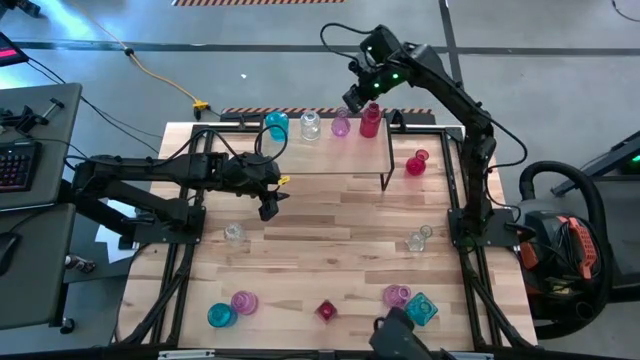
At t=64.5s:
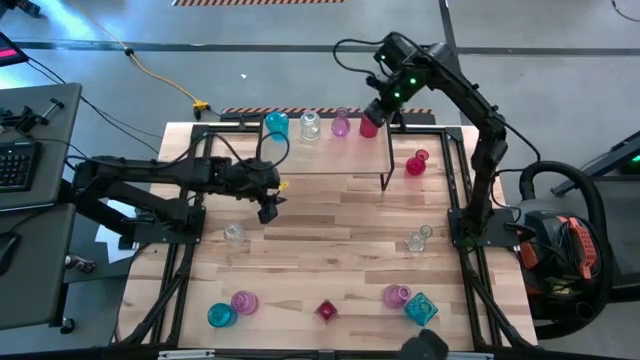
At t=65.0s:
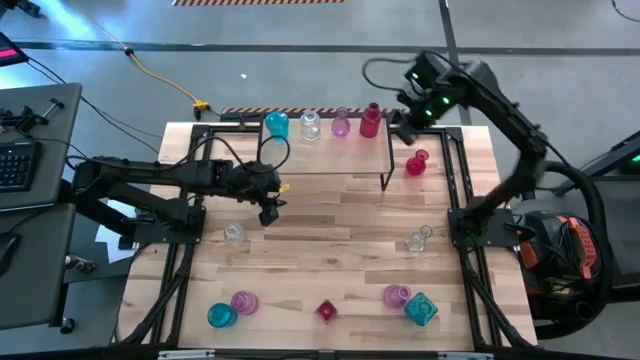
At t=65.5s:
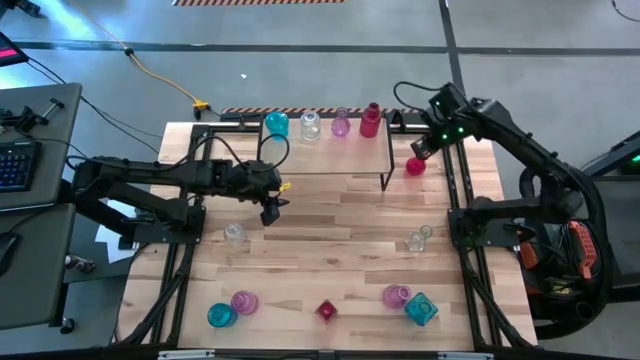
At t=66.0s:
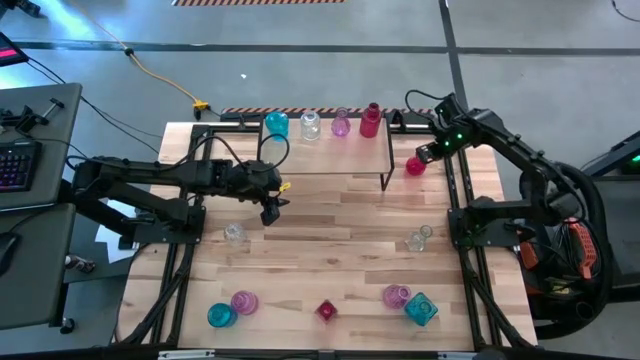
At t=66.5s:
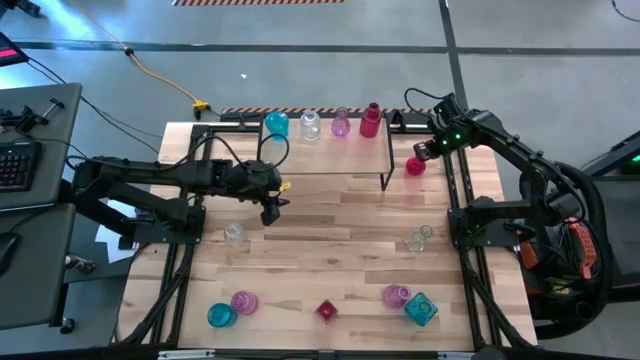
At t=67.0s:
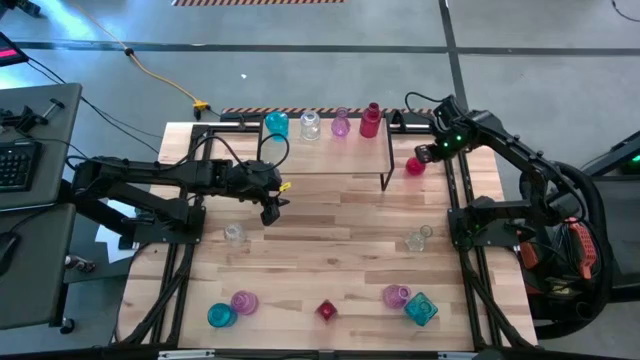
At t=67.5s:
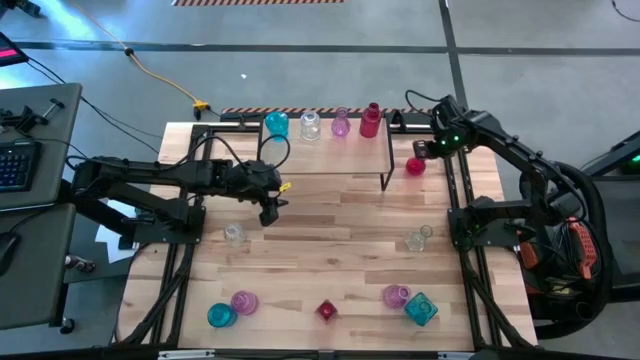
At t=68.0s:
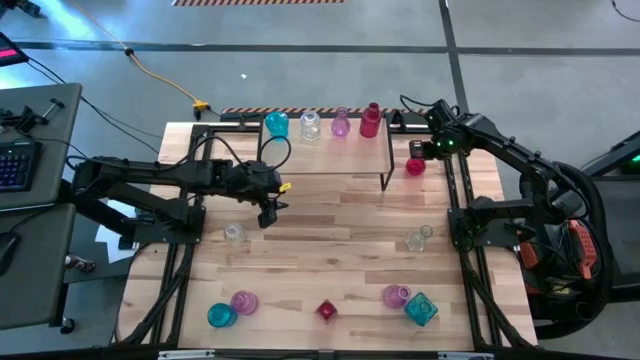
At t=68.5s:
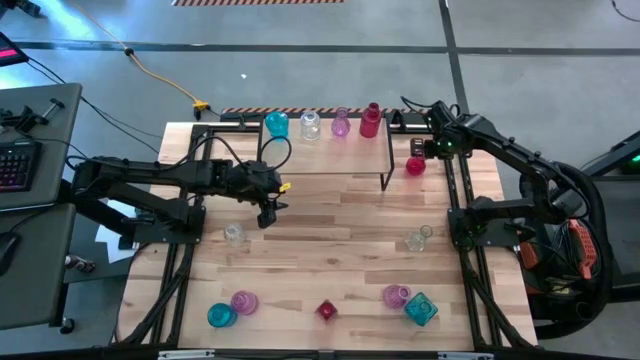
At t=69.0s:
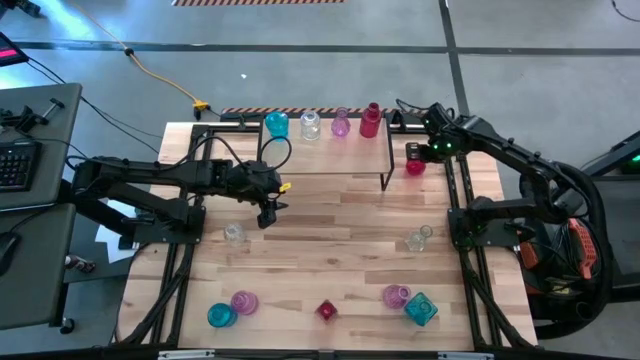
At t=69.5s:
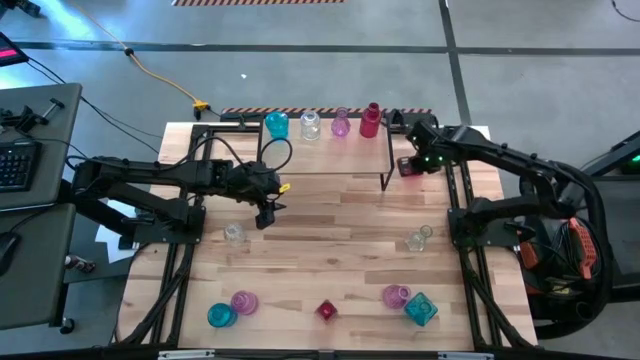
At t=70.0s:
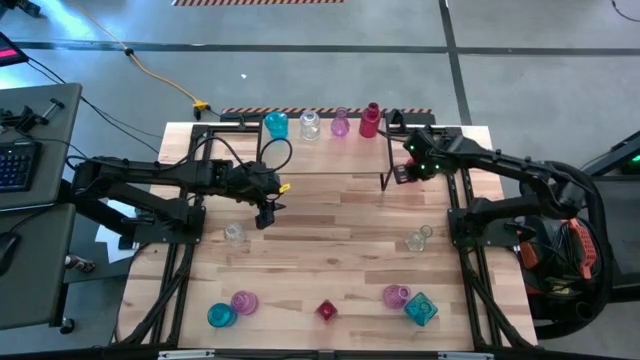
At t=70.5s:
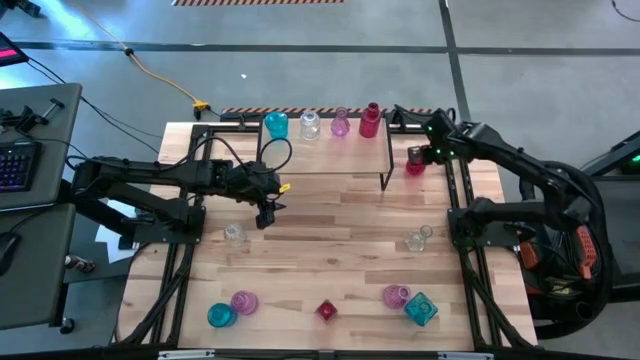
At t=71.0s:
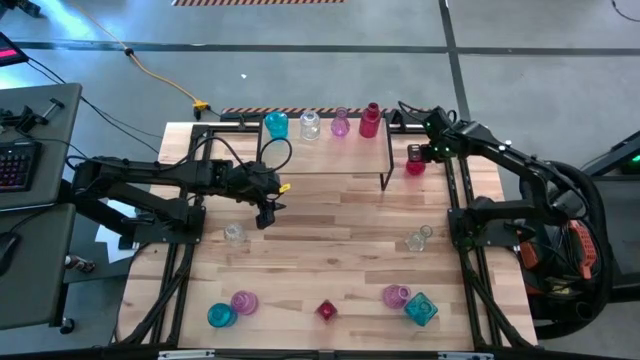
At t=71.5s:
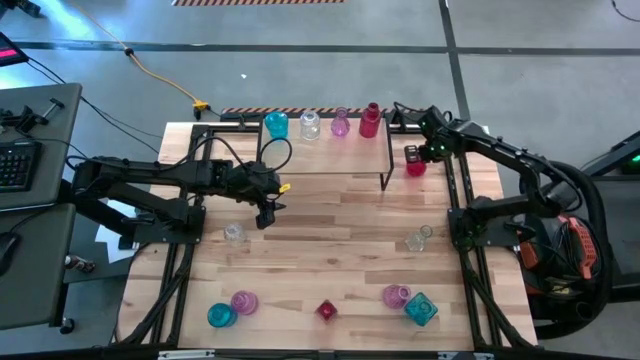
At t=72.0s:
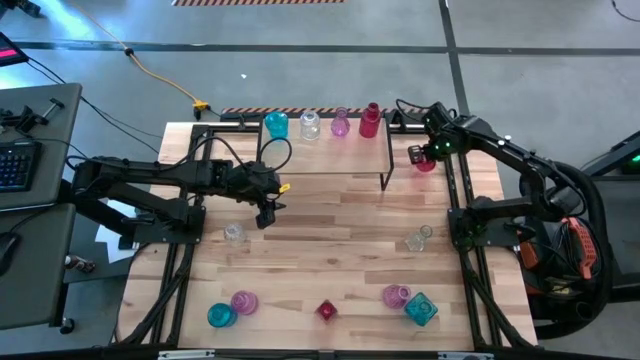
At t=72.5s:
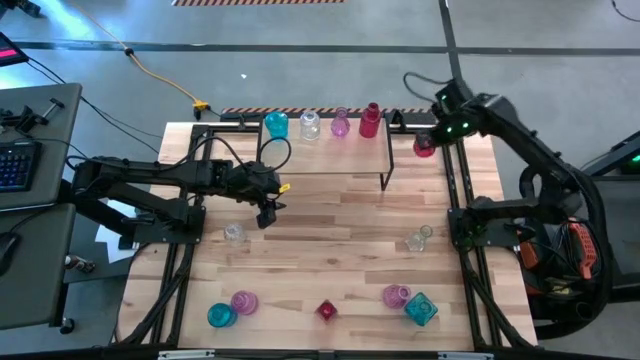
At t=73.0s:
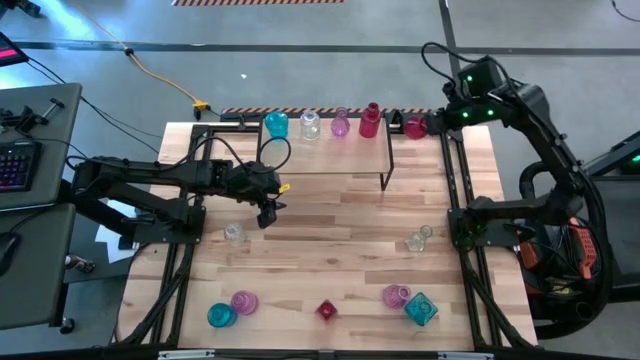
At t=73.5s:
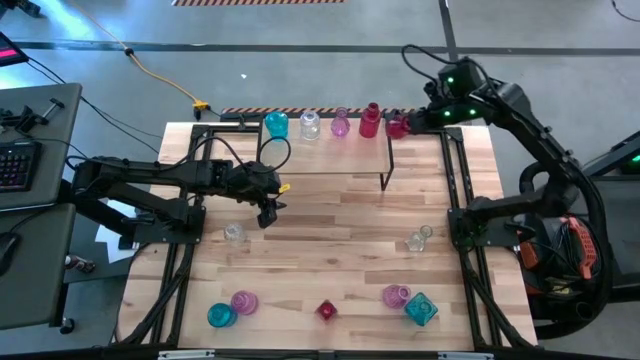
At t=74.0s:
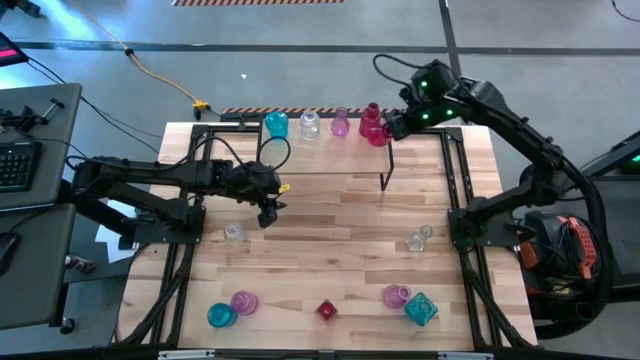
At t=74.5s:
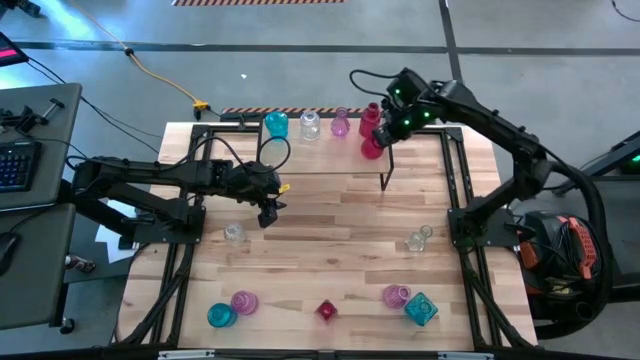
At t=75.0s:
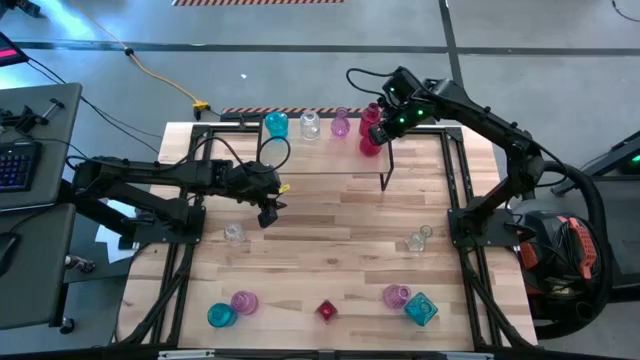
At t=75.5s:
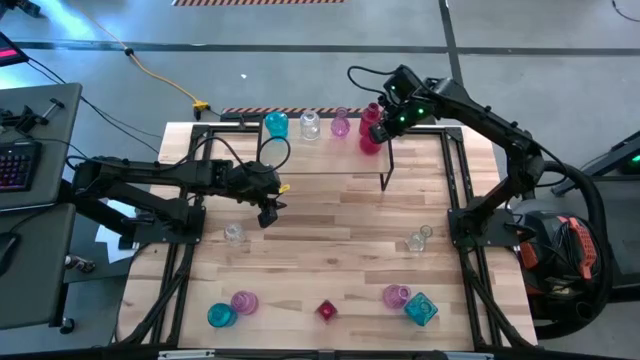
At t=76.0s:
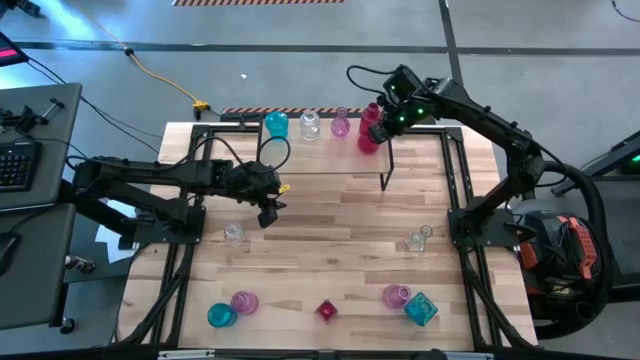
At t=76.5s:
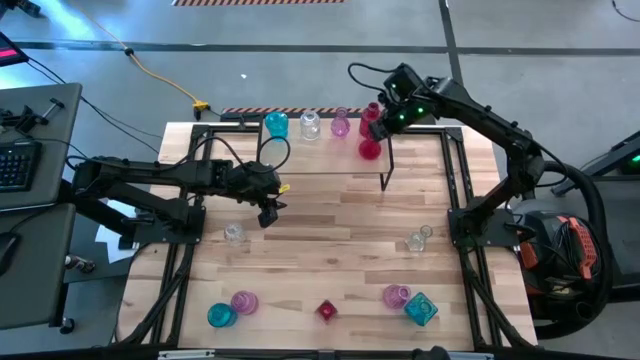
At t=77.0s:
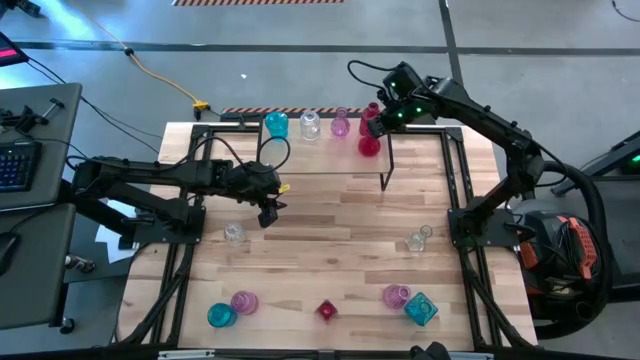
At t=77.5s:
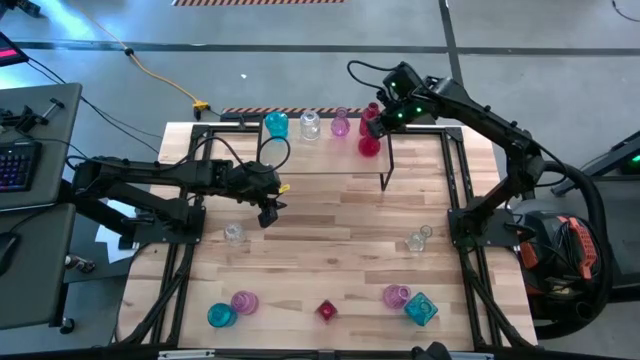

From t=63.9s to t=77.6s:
Task: sort vases onto shelf
Put the top red vase on the shelf aligned with the other red vase

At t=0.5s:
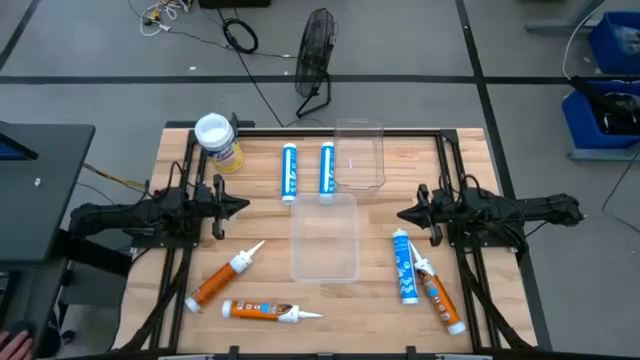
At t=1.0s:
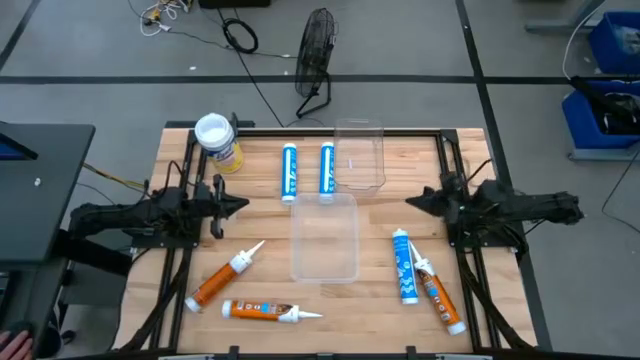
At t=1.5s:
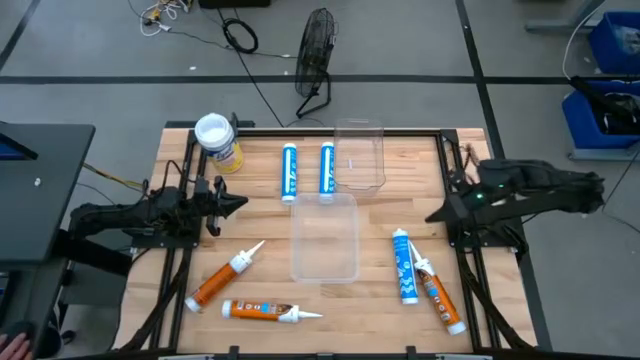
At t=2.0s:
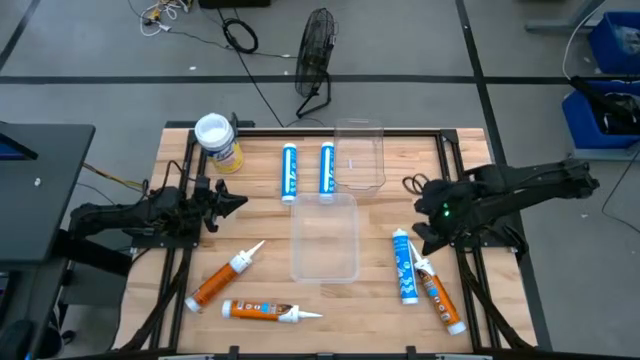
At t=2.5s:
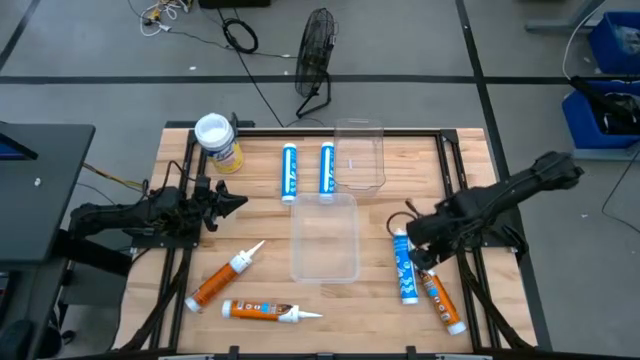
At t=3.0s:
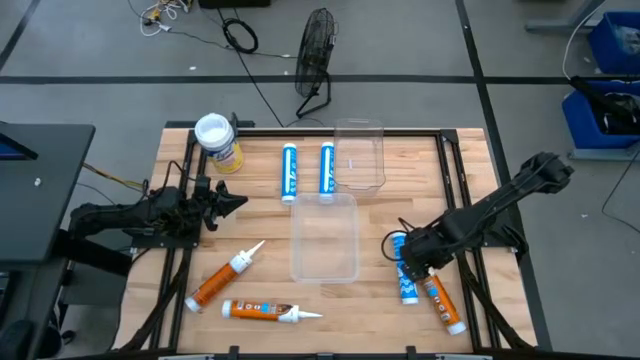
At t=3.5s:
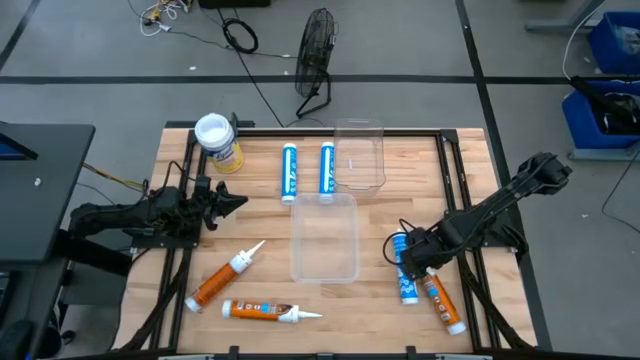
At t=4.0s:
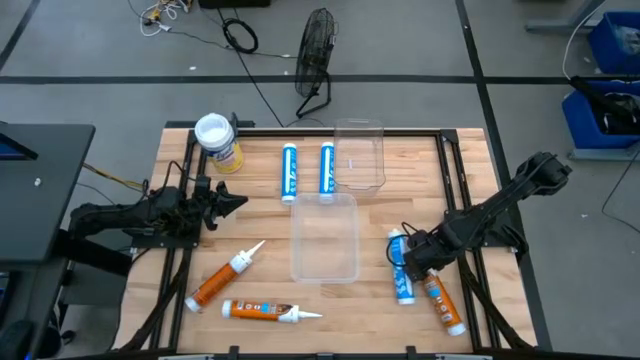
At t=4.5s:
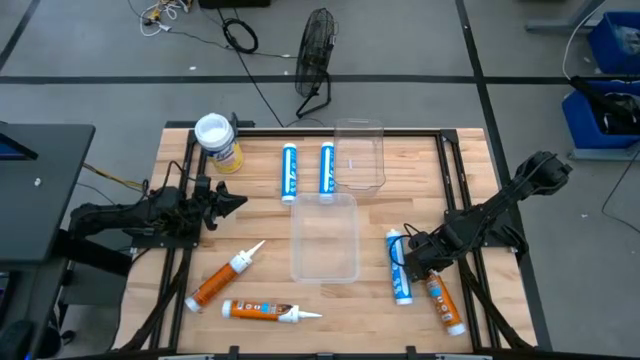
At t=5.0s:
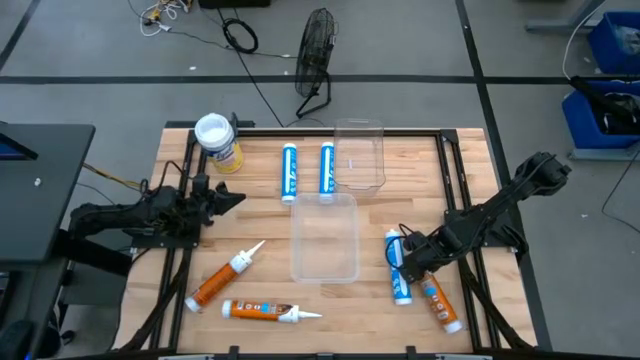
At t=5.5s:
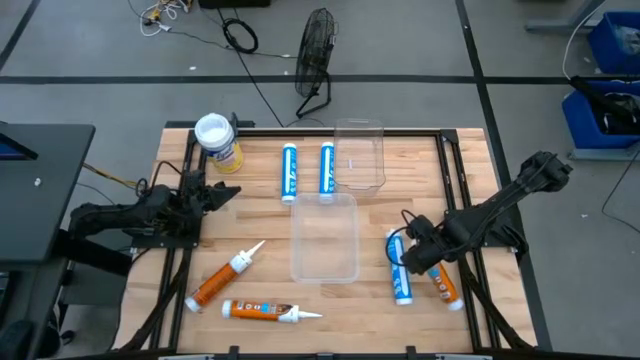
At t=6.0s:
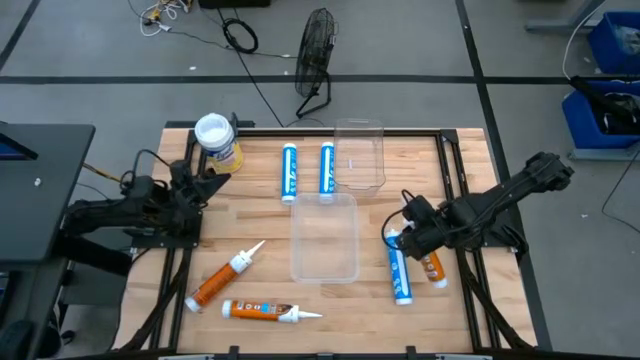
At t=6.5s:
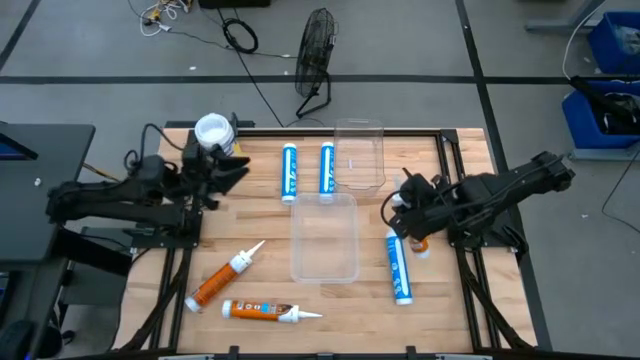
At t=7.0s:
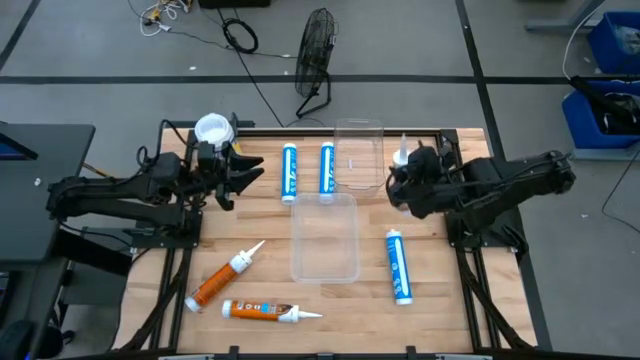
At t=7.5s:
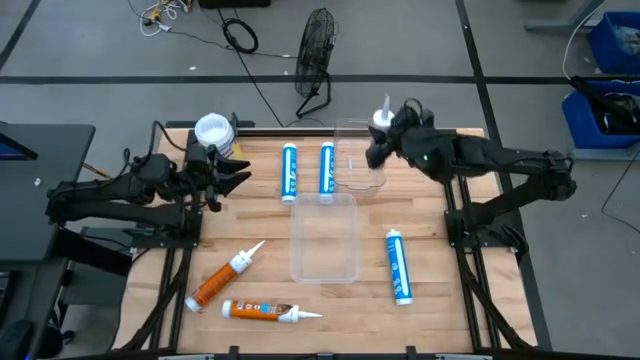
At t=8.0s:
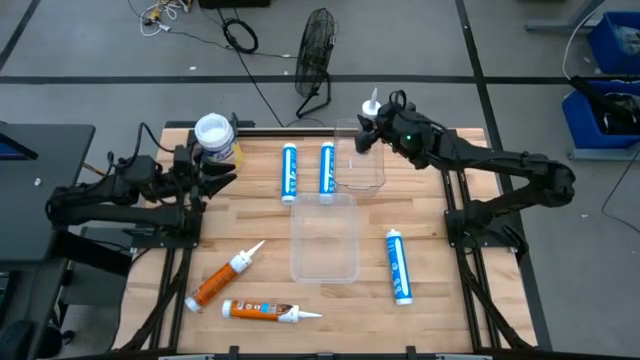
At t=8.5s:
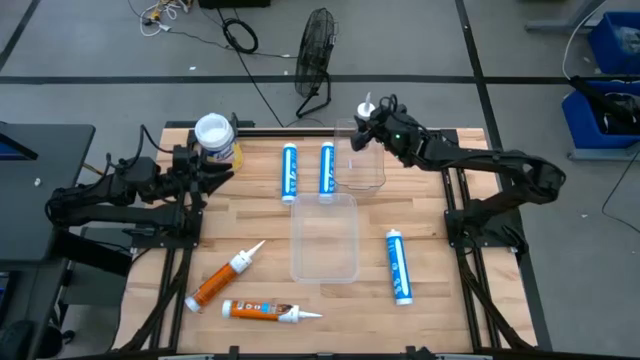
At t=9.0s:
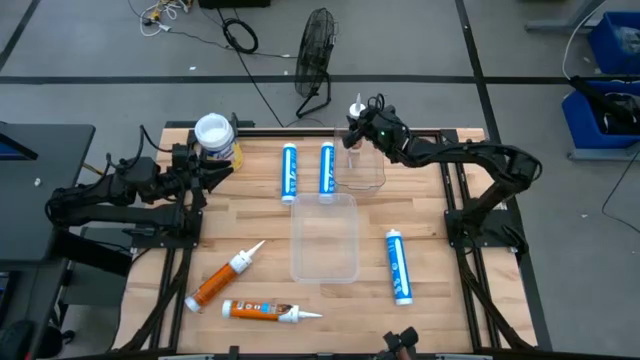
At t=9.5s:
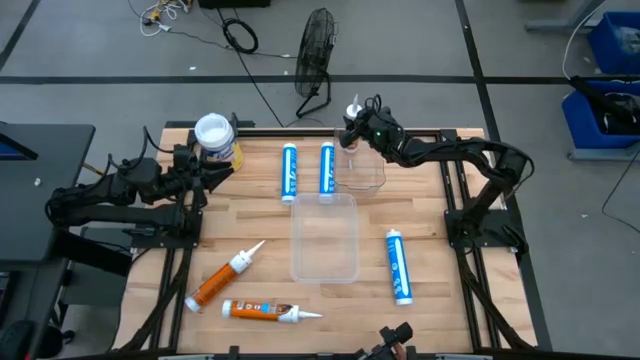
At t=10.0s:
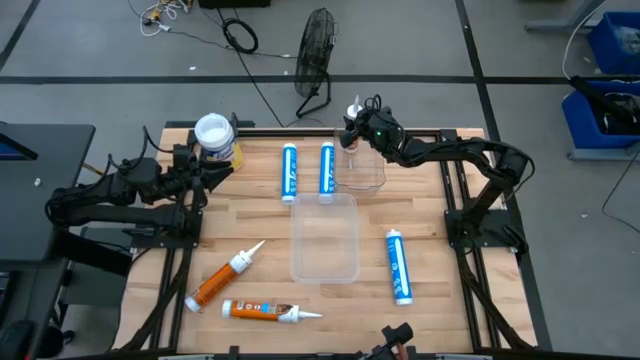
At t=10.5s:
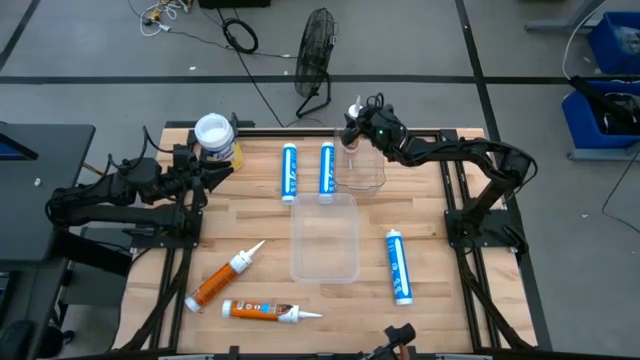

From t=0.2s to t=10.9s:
Task: Sort silicone sealant tubes
Put the right orange sealant into the top transparent bin
